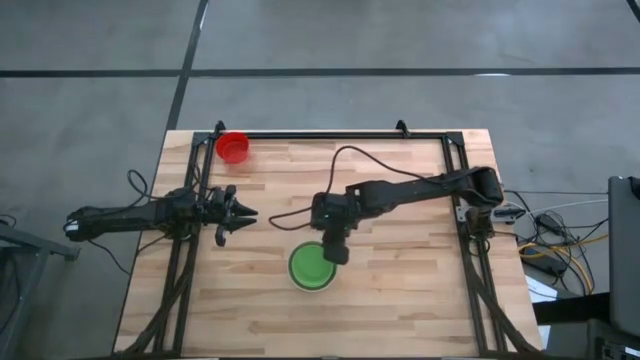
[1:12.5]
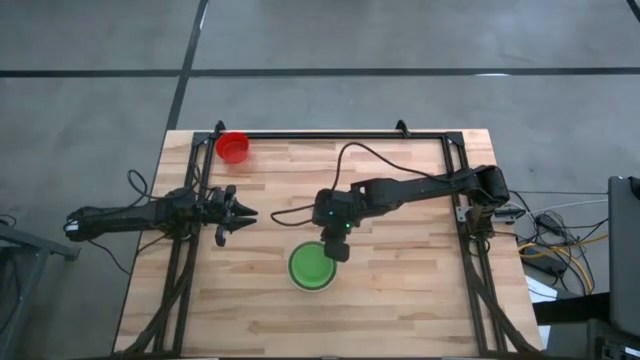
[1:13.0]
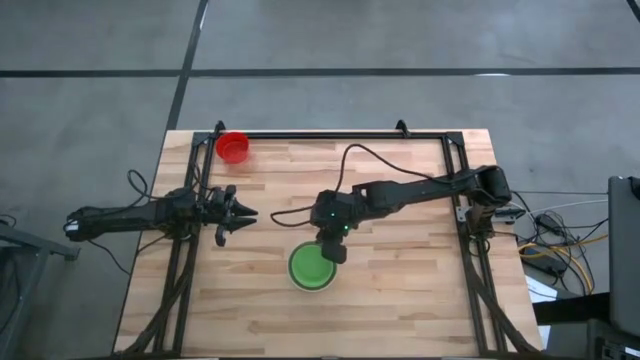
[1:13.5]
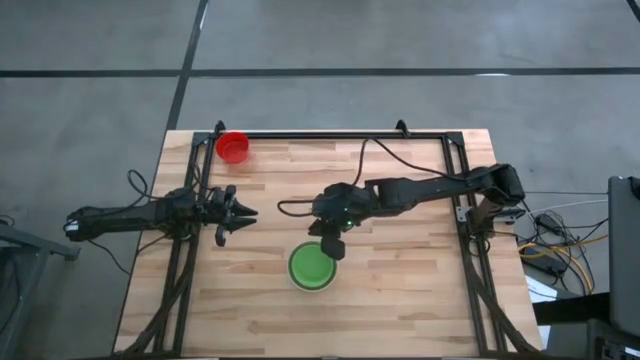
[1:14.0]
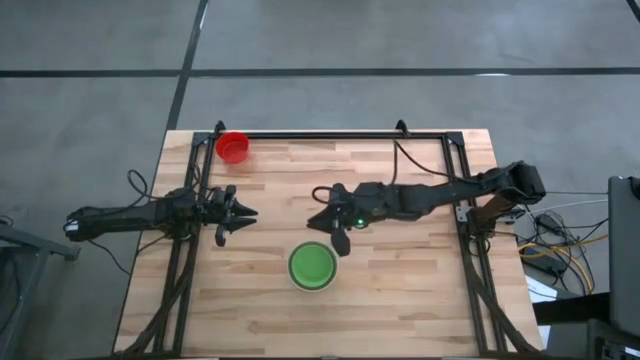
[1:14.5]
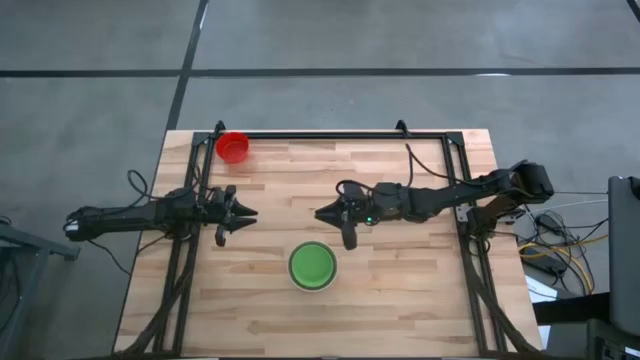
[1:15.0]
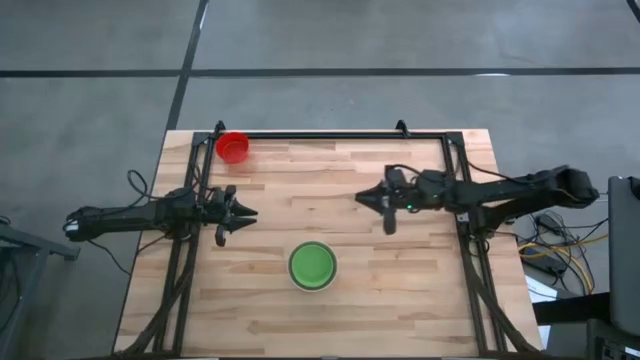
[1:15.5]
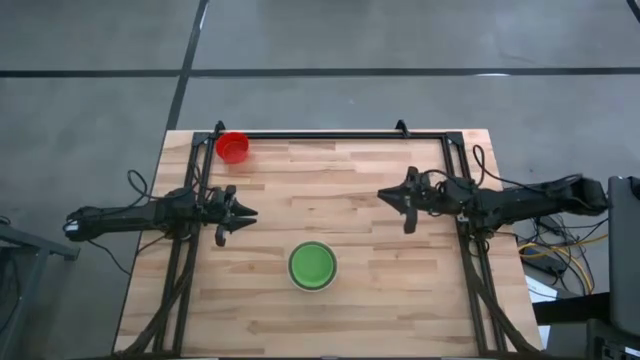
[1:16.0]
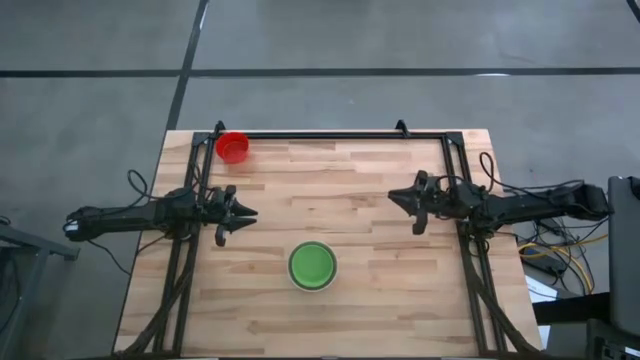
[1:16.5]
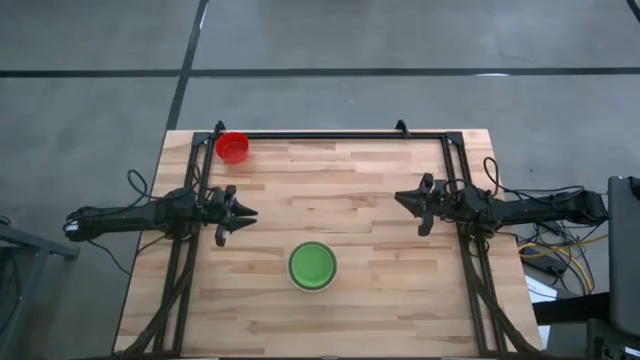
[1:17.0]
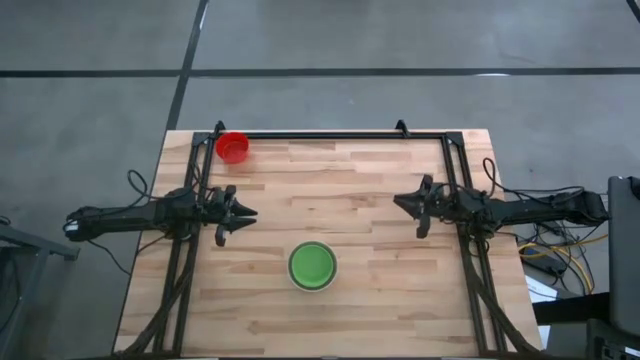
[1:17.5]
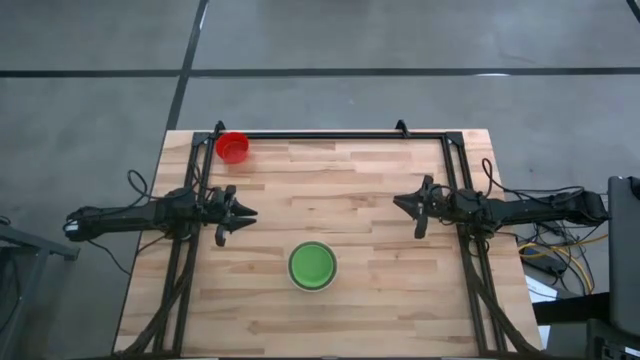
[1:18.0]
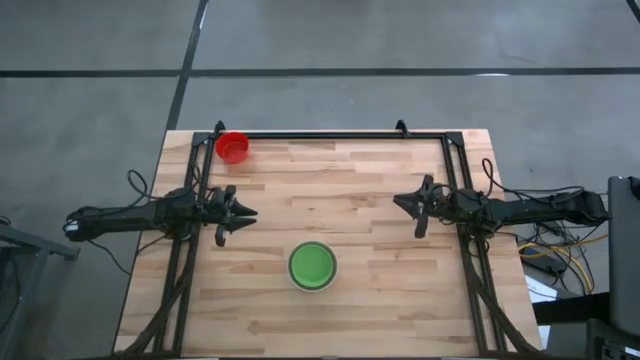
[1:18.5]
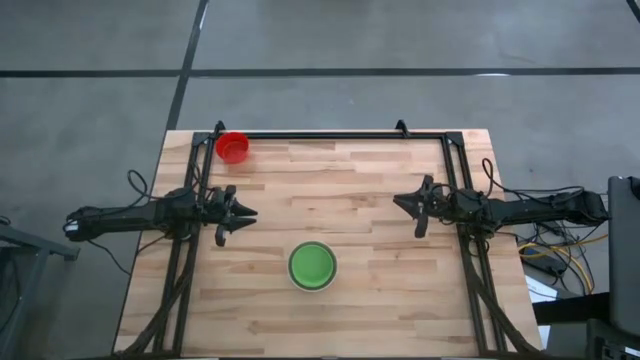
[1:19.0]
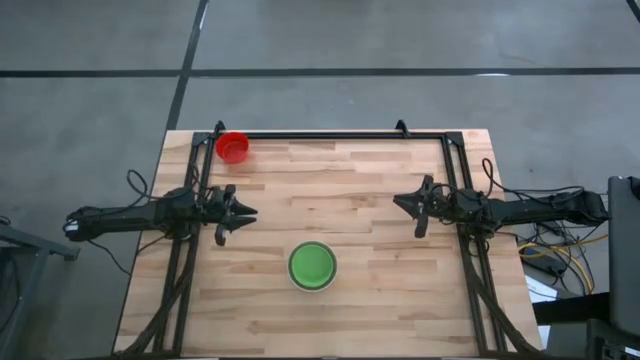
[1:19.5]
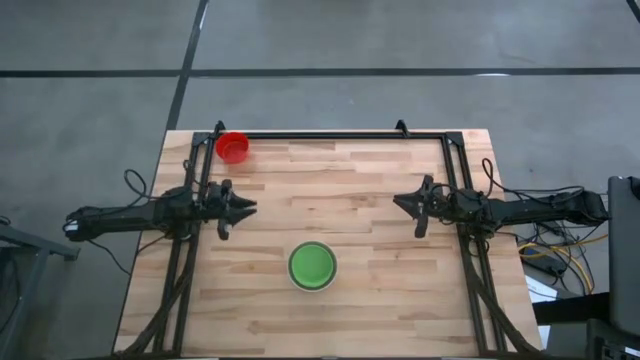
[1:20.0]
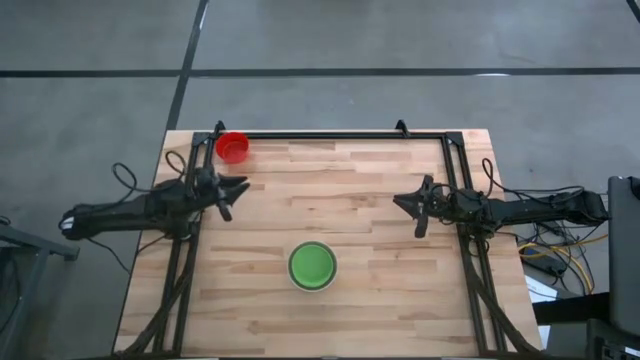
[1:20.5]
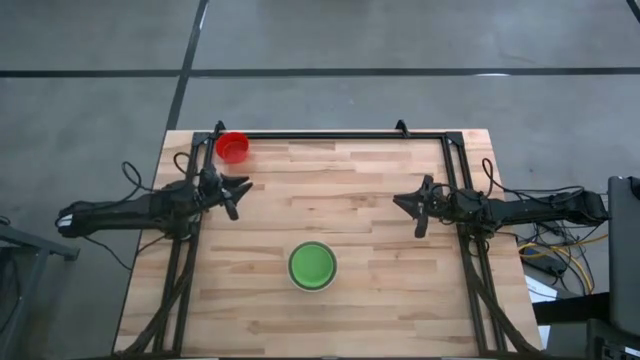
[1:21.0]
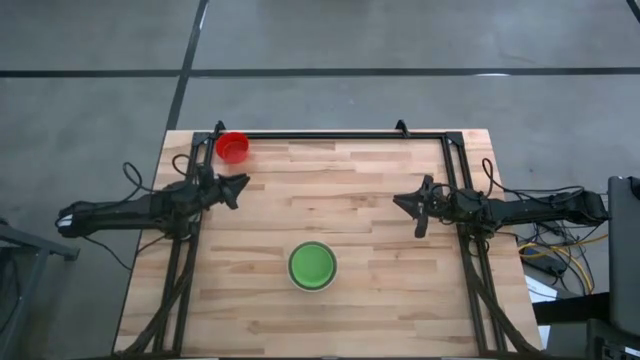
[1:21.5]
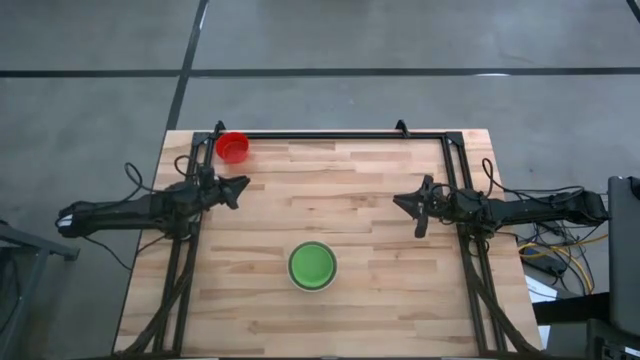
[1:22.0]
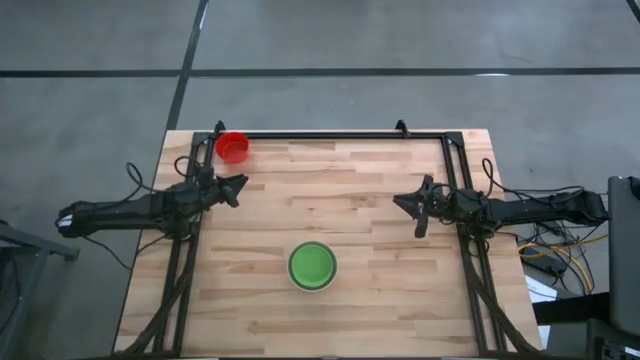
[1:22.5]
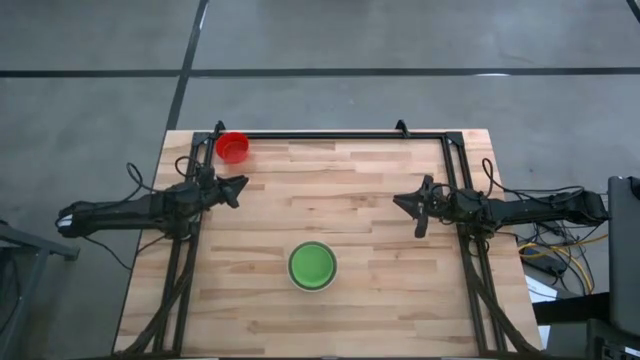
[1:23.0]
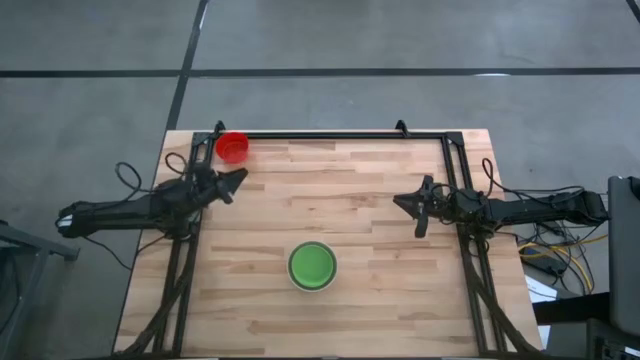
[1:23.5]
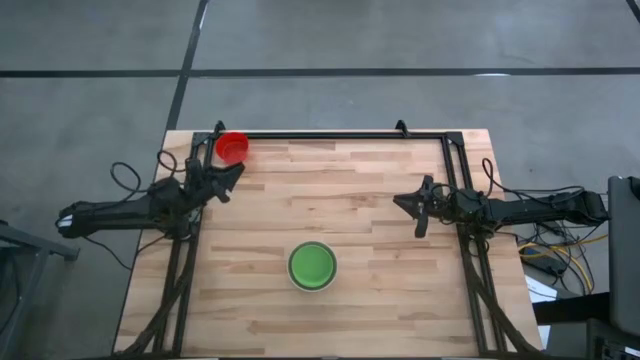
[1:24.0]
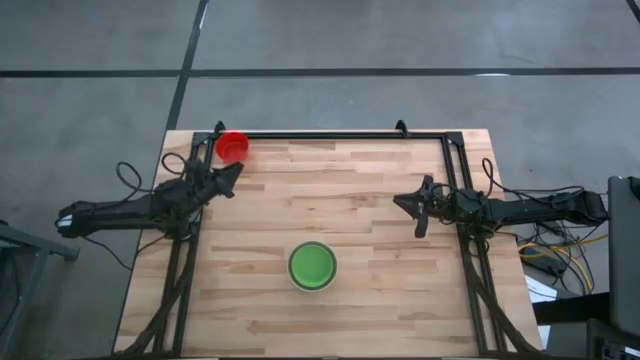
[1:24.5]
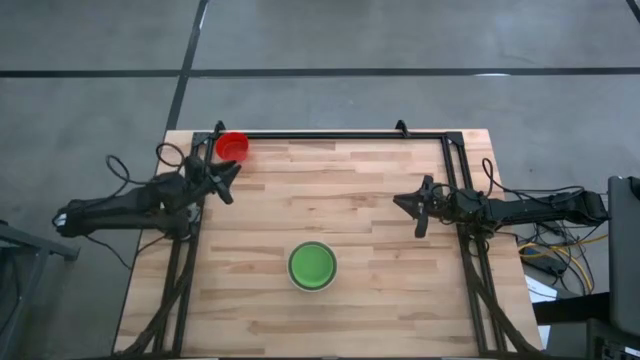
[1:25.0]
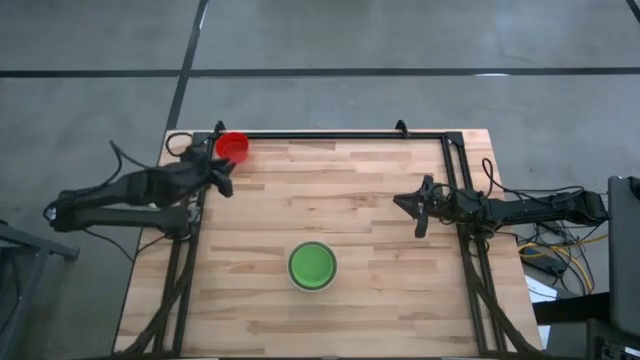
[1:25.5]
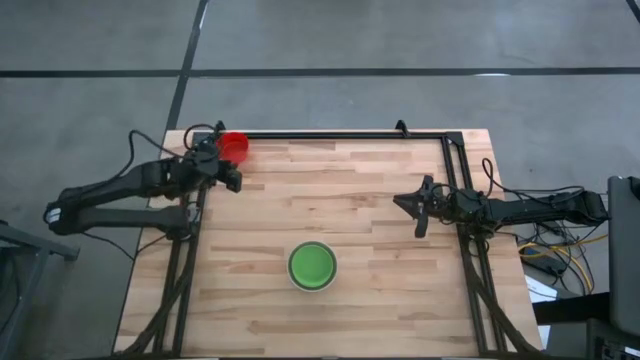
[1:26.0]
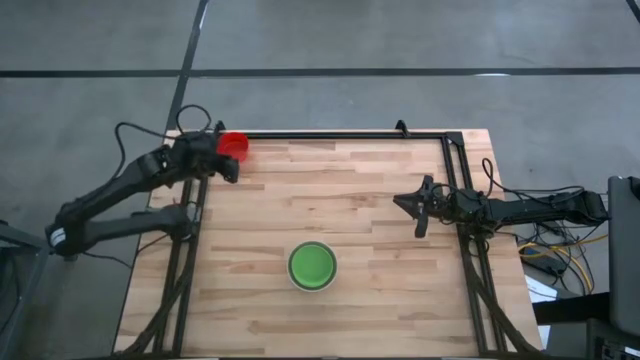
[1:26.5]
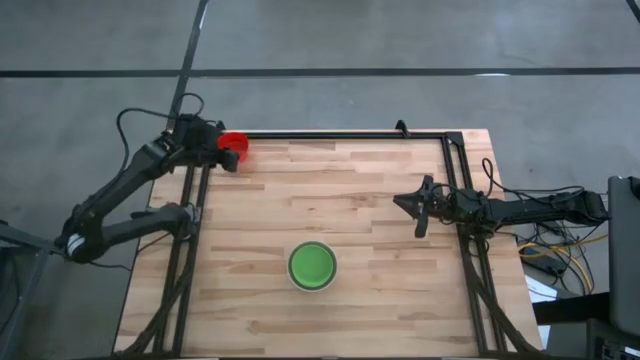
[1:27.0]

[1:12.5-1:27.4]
Stack the red bowl on the green bowl
